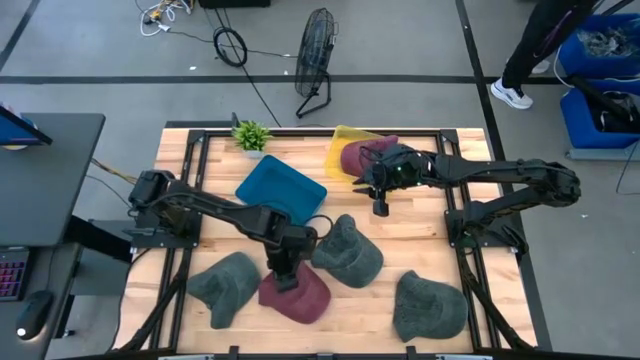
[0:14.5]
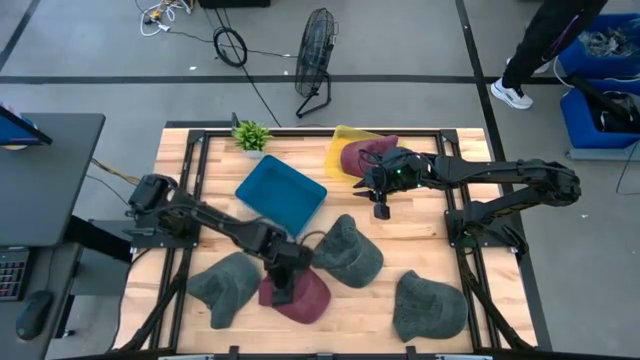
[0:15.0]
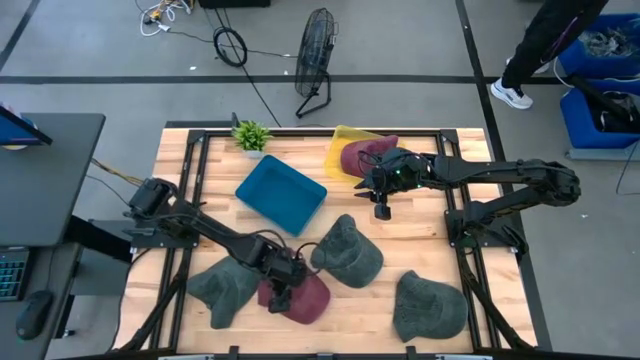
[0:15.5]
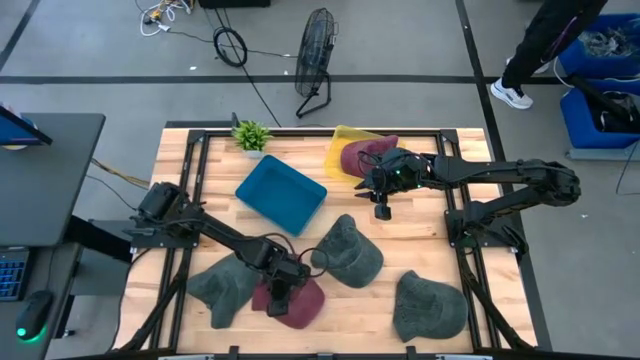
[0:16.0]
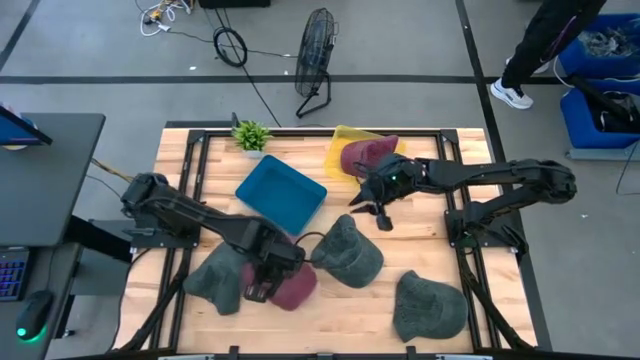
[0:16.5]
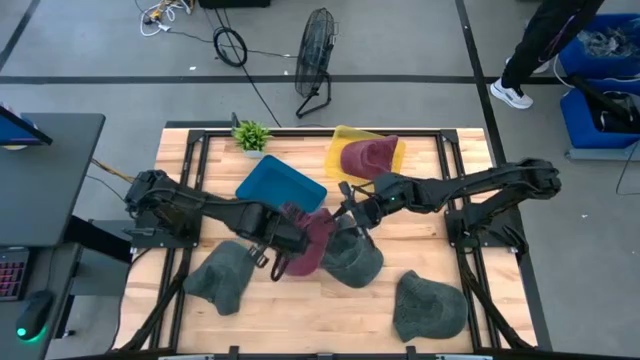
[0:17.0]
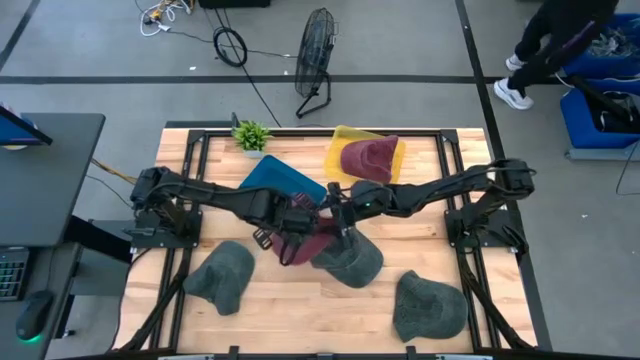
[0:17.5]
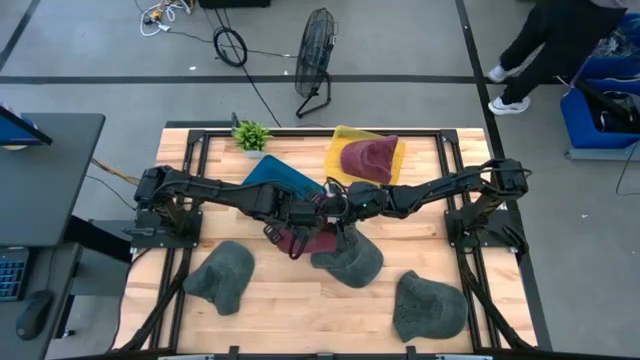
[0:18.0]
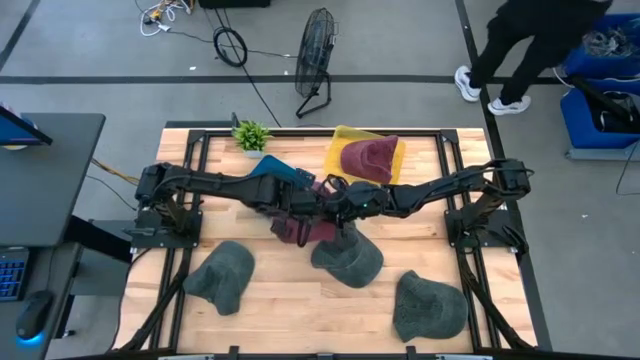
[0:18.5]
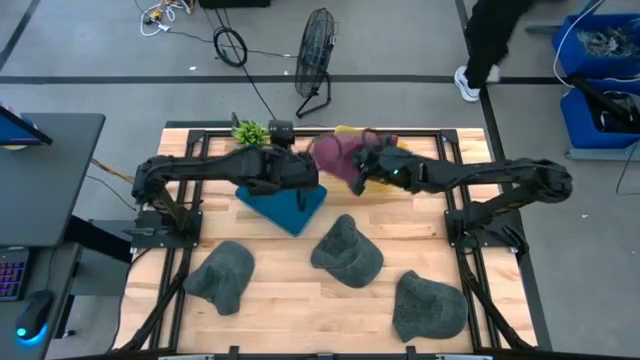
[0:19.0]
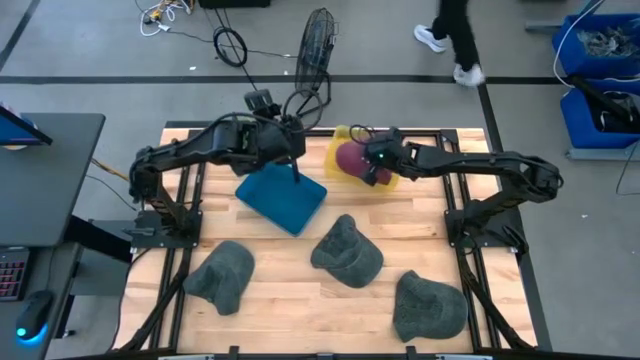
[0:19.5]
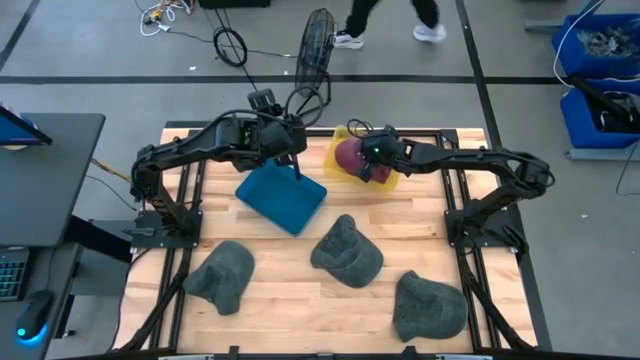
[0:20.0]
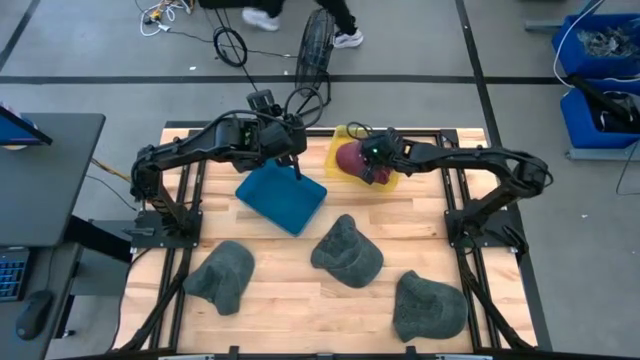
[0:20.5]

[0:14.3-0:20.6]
Task: Pick & Place hat
Put the red cap into the yellow bin

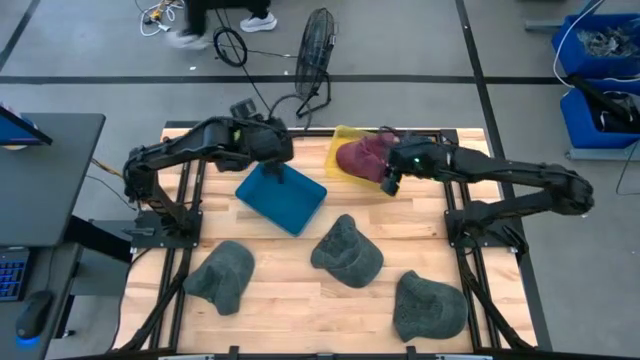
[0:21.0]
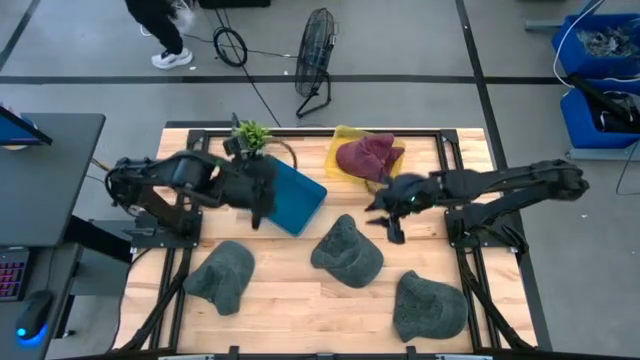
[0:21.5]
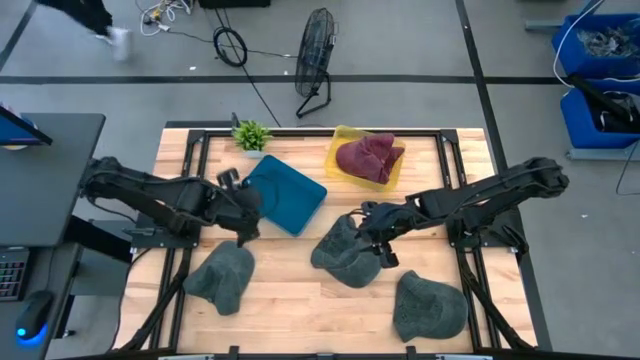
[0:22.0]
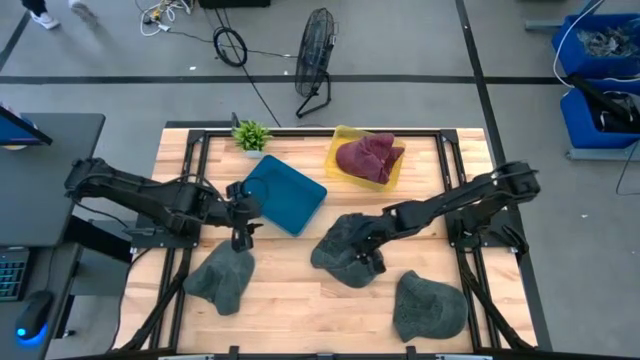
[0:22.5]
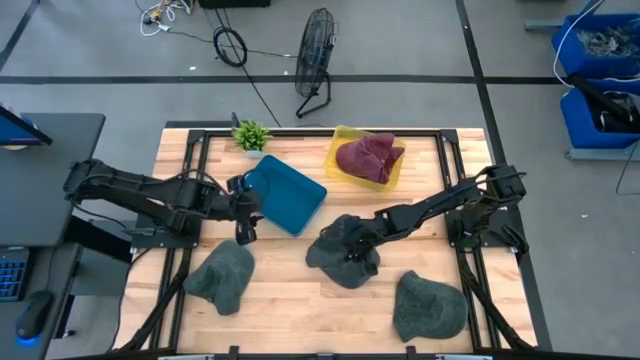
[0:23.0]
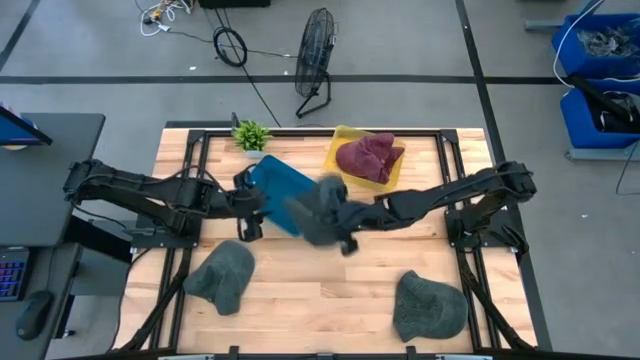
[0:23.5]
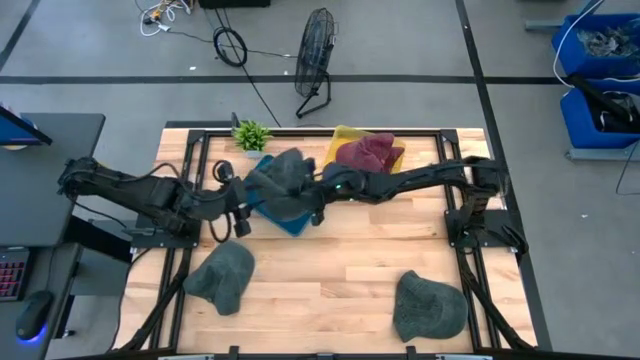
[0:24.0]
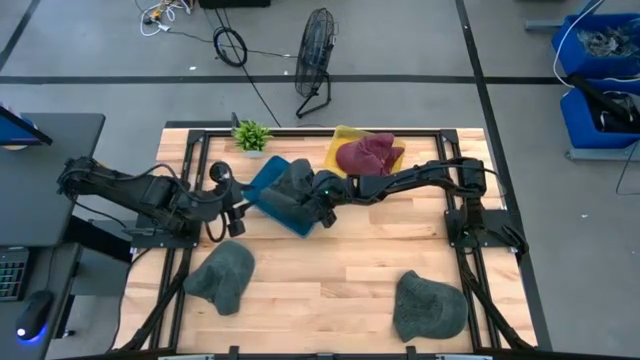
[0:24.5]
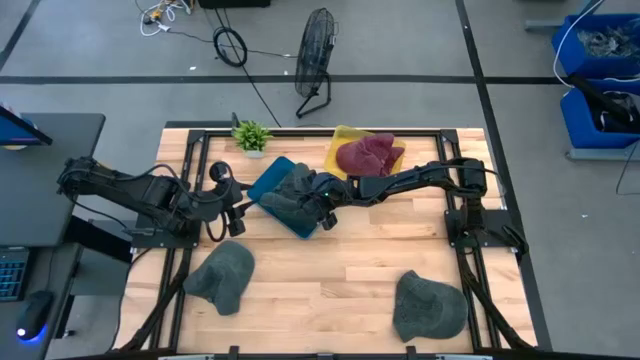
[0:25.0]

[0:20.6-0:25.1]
Put the middle black cap into the blue bin

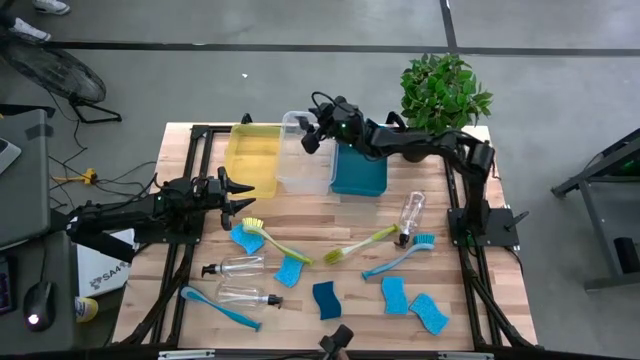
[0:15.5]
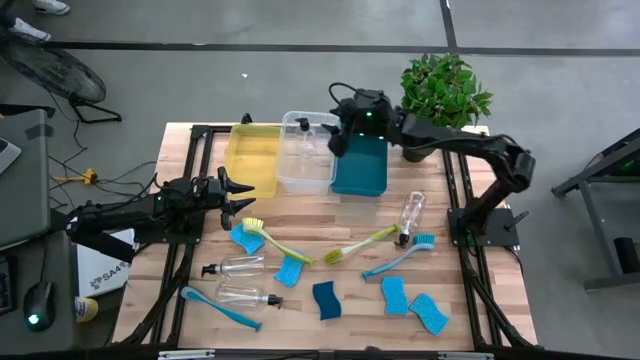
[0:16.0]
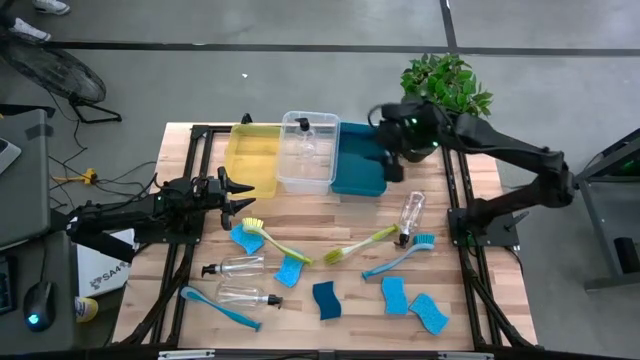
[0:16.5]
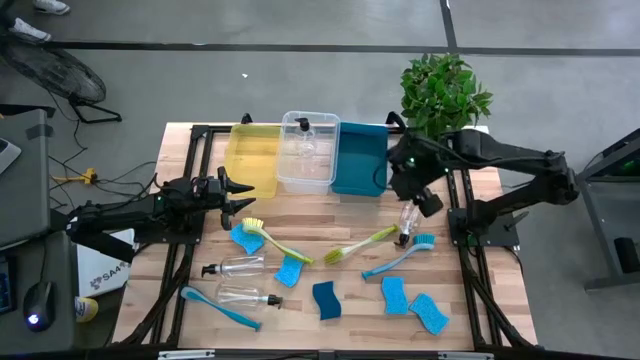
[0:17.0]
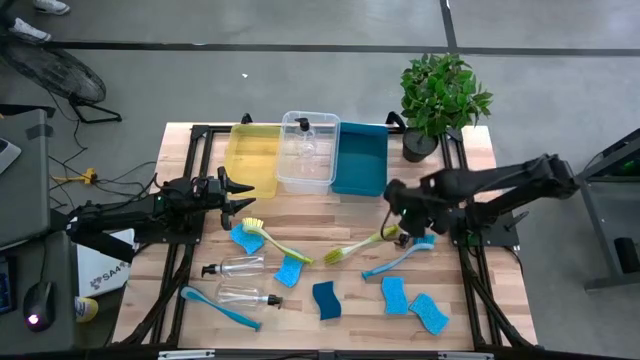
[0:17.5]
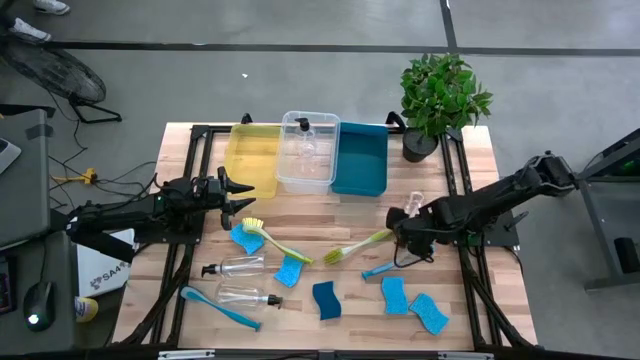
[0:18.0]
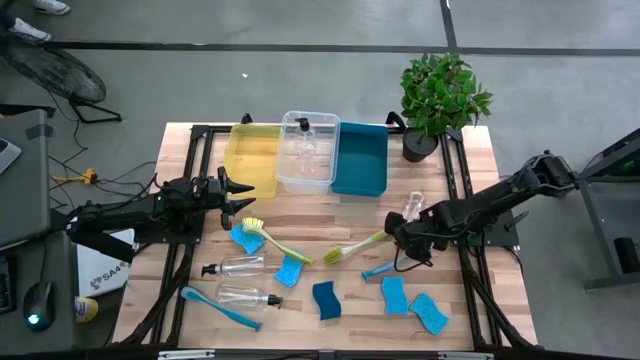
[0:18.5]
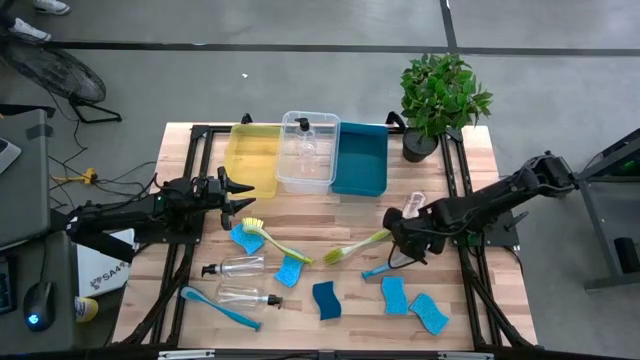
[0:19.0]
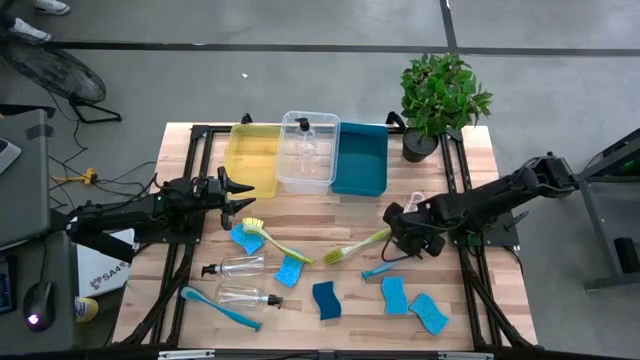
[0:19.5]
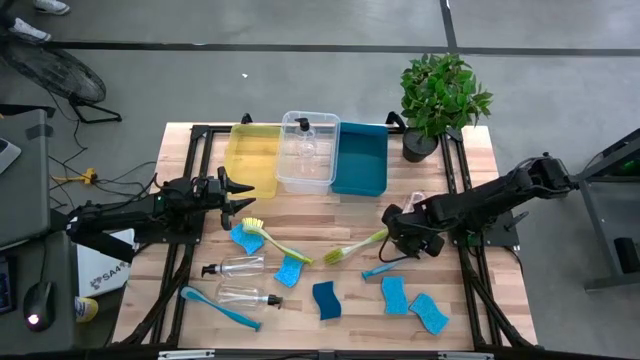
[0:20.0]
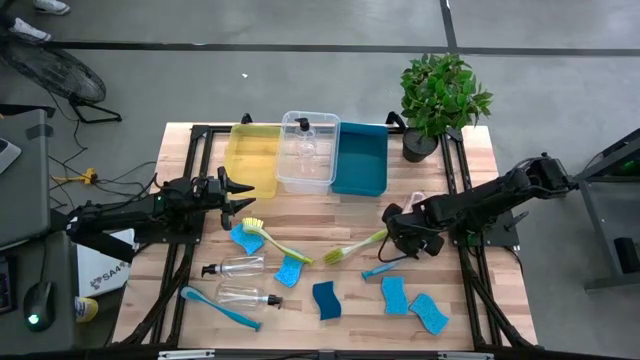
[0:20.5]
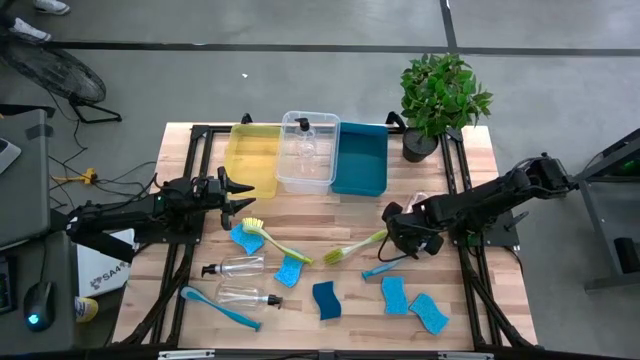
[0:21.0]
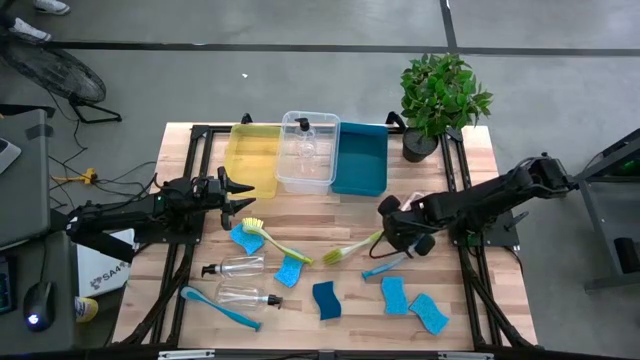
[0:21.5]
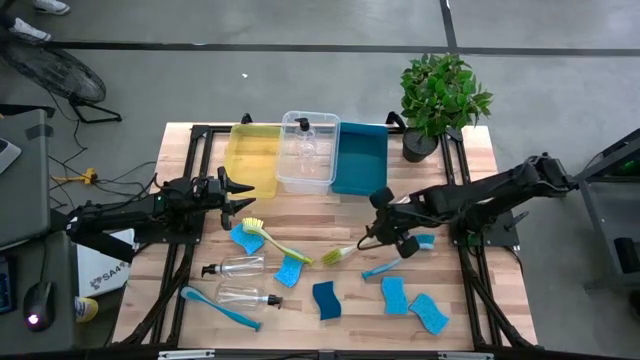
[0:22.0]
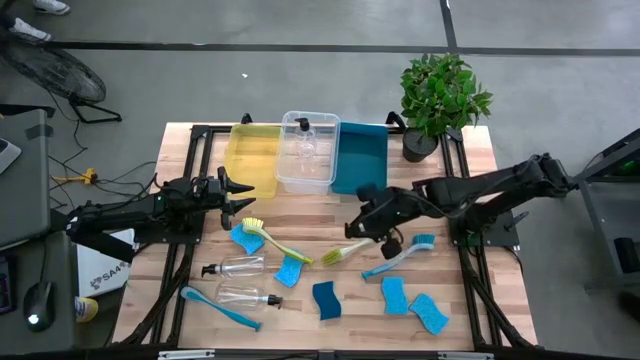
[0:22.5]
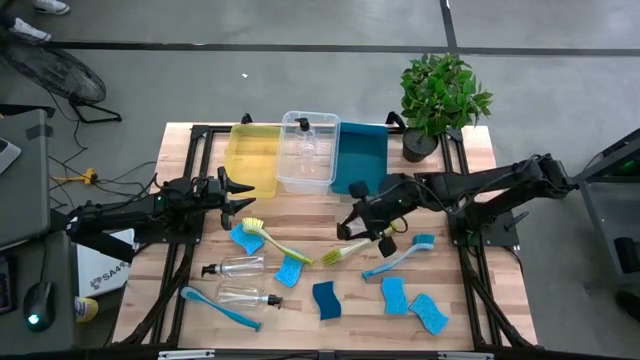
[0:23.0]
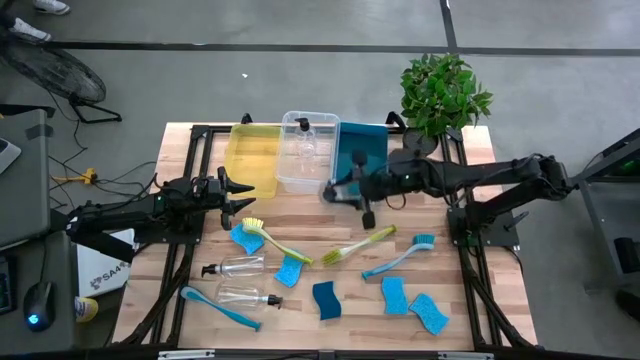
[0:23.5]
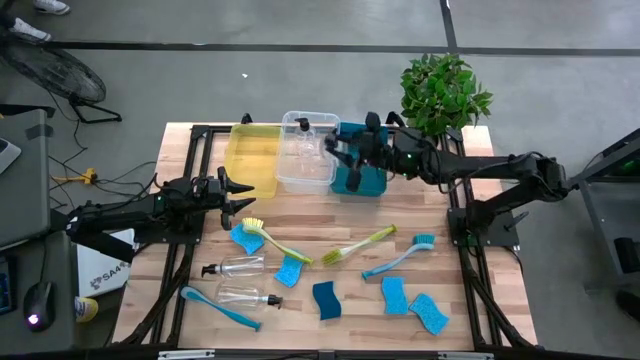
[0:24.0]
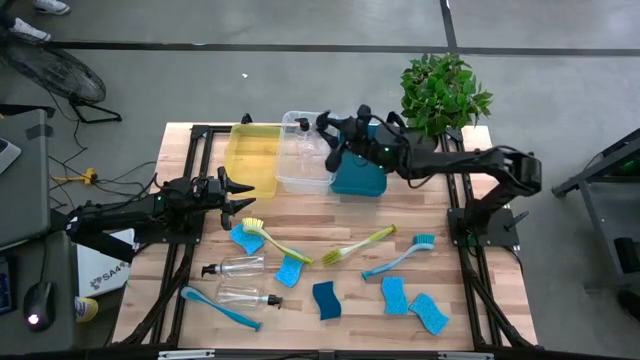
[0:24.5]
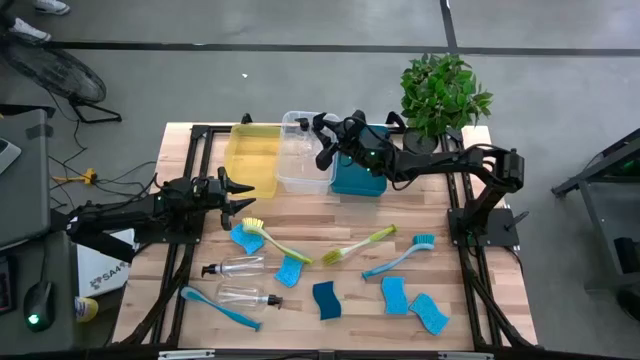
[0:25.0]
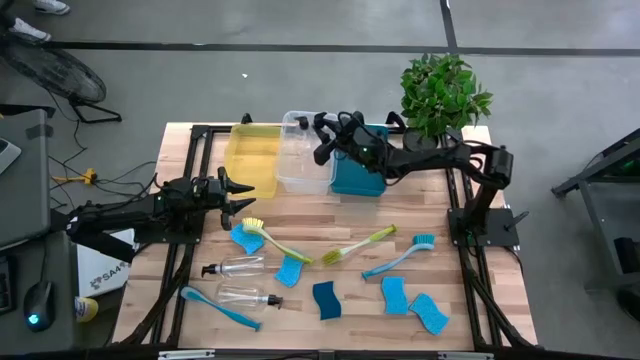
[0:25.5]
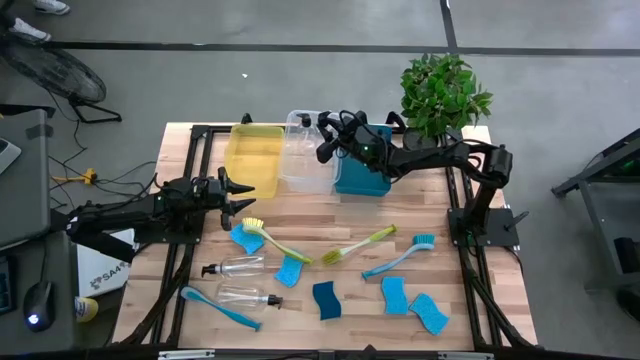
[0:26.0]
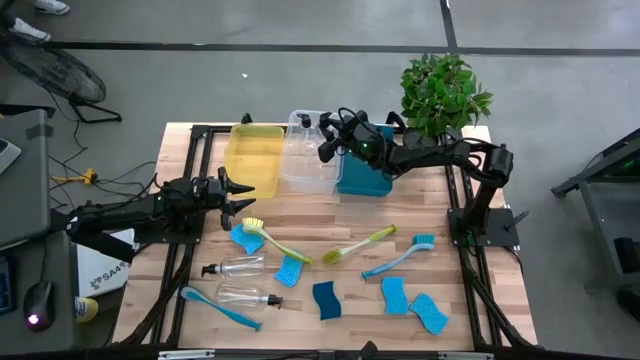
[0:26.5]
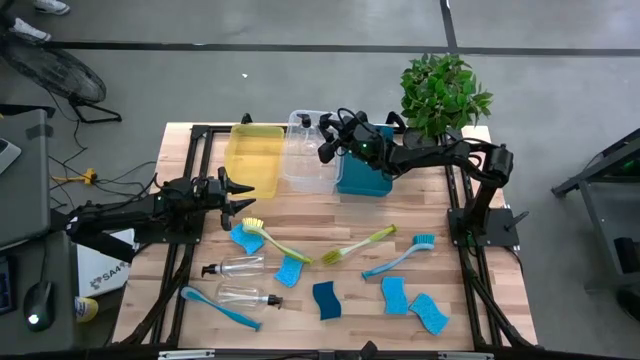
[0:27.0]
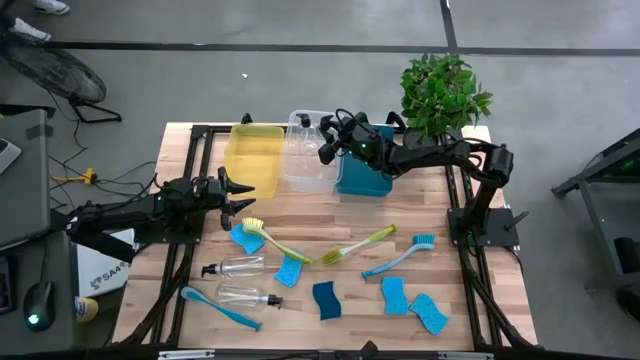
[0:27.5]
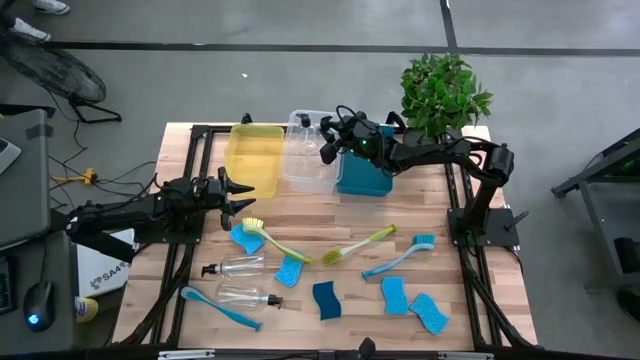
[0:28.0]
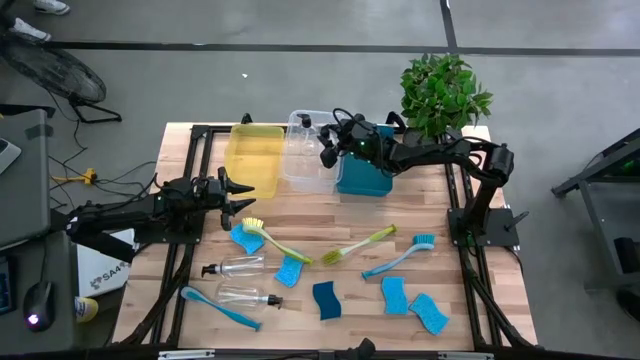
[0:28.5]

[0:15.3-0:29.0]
Task: Pick & Place Kitchen Sink Supplies
Put the transparent dishwashing bottle into the transparent bin
